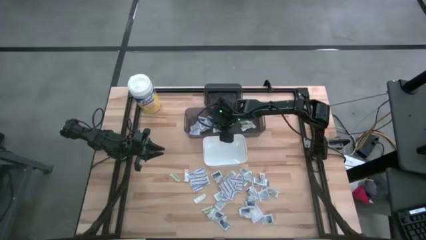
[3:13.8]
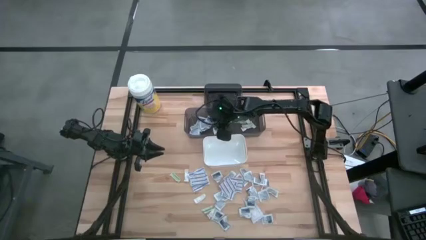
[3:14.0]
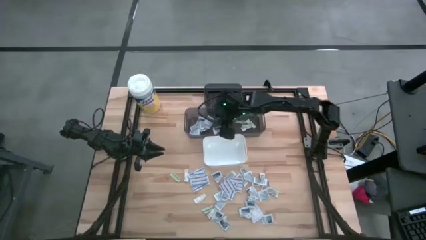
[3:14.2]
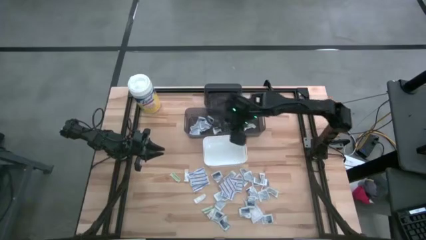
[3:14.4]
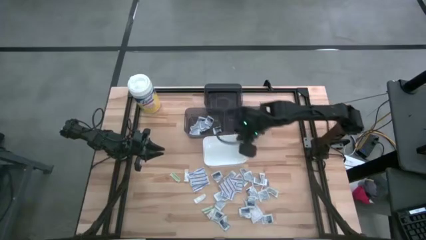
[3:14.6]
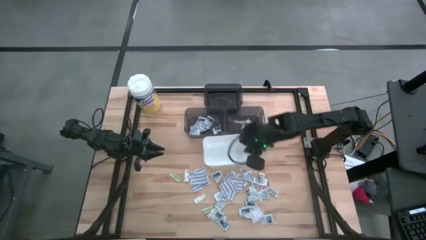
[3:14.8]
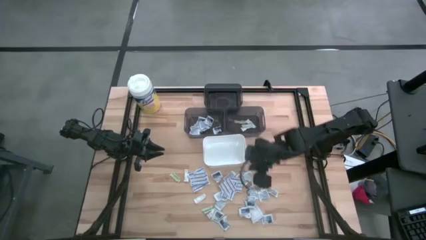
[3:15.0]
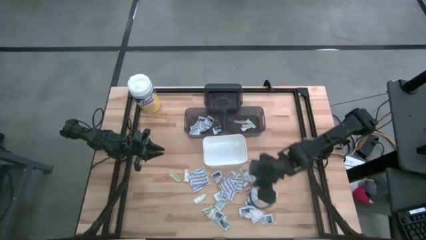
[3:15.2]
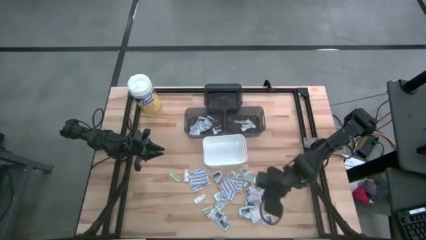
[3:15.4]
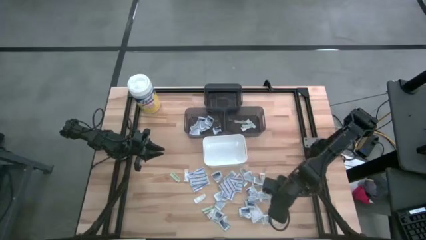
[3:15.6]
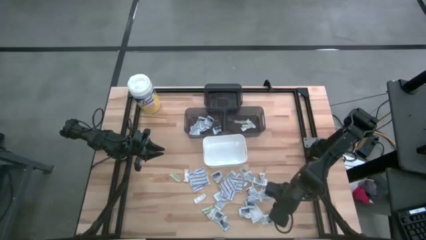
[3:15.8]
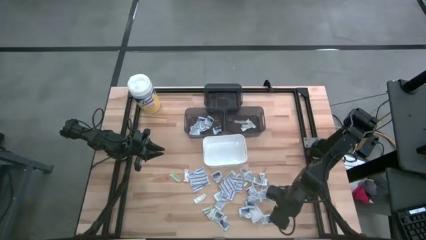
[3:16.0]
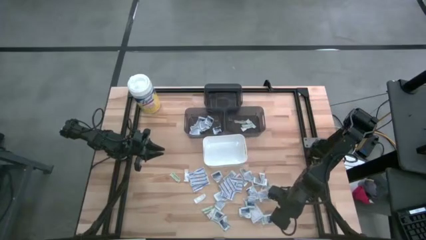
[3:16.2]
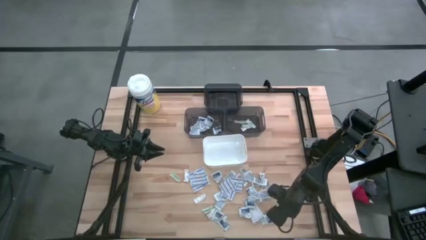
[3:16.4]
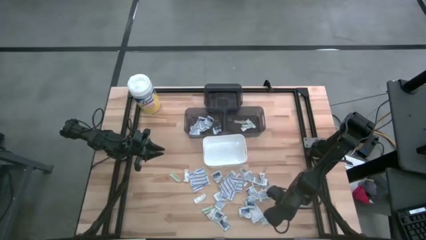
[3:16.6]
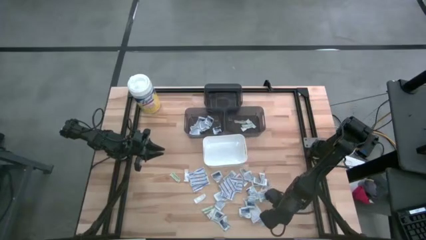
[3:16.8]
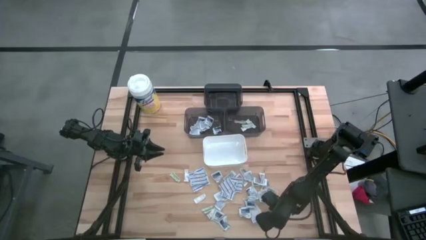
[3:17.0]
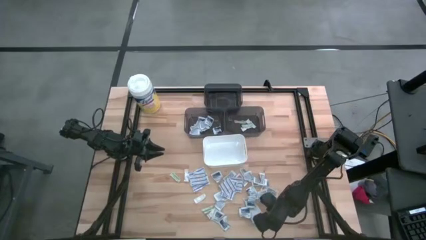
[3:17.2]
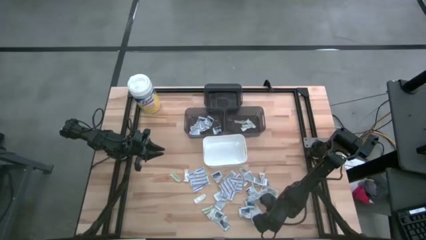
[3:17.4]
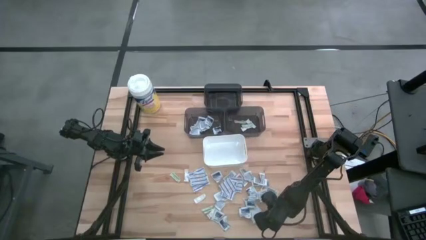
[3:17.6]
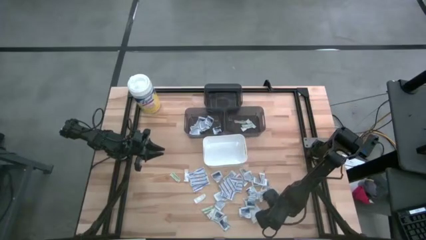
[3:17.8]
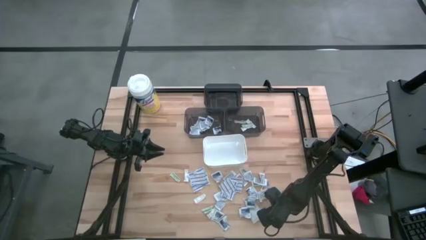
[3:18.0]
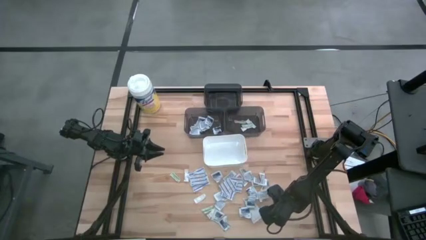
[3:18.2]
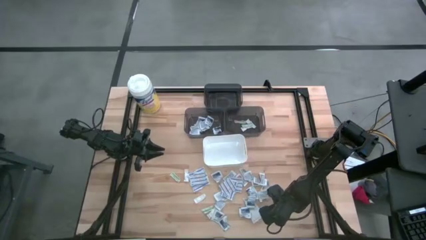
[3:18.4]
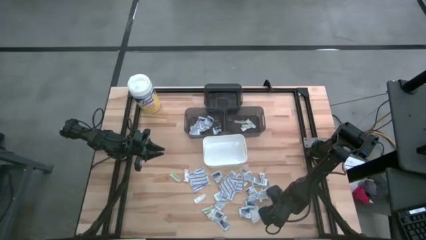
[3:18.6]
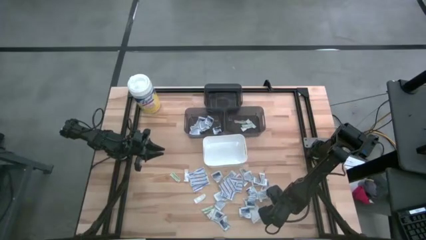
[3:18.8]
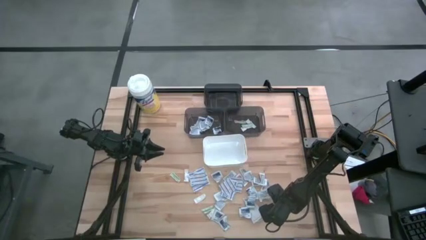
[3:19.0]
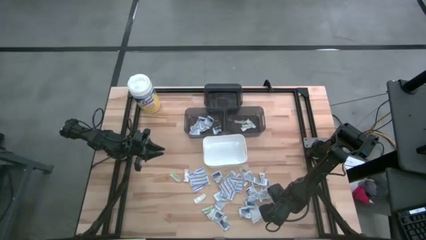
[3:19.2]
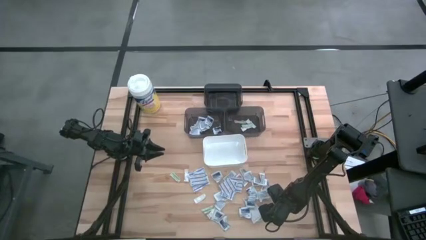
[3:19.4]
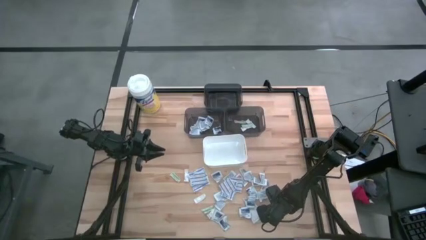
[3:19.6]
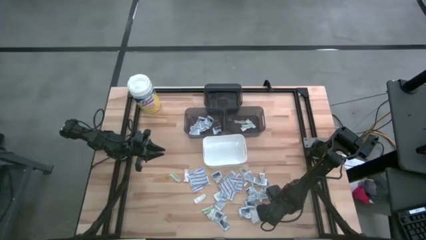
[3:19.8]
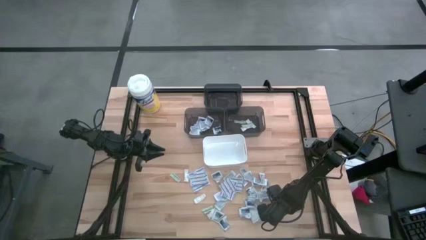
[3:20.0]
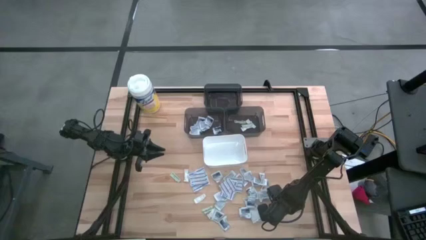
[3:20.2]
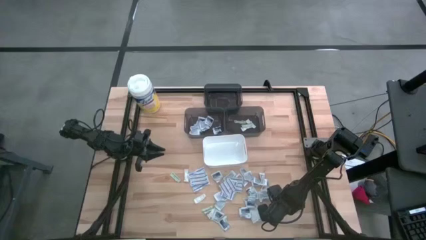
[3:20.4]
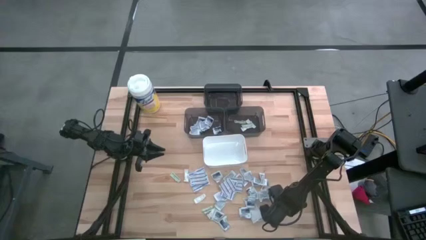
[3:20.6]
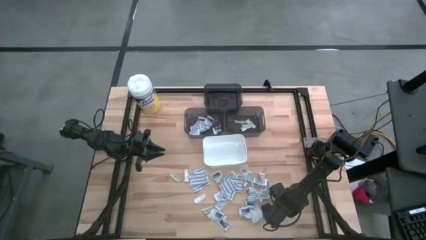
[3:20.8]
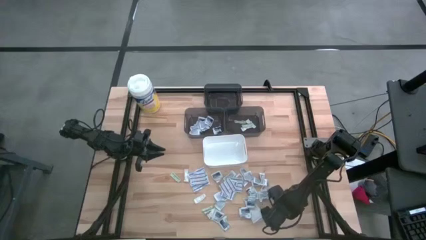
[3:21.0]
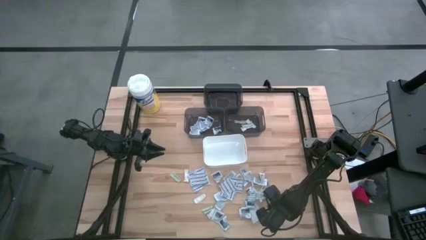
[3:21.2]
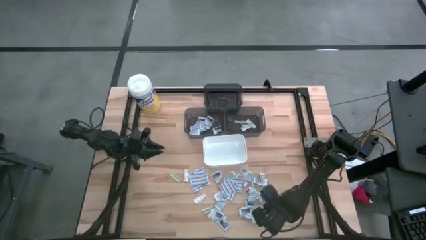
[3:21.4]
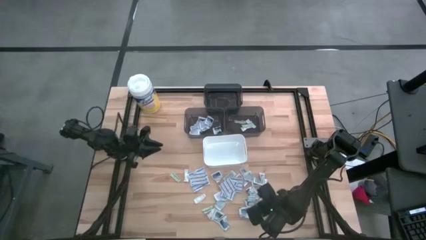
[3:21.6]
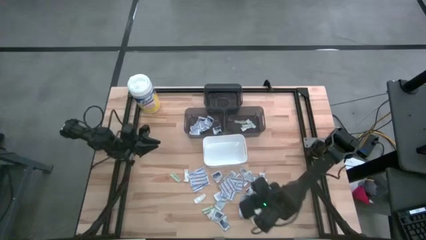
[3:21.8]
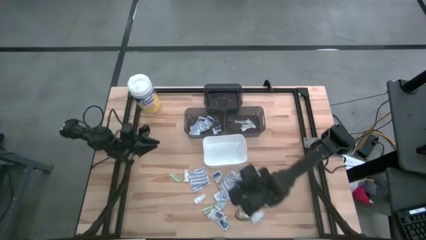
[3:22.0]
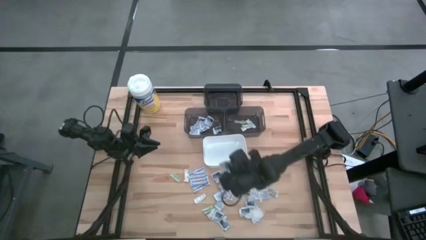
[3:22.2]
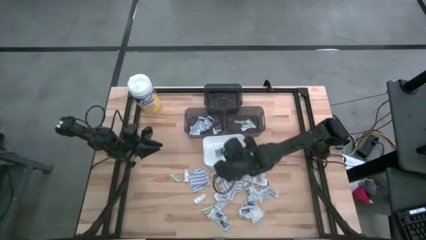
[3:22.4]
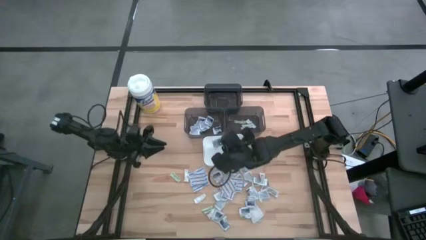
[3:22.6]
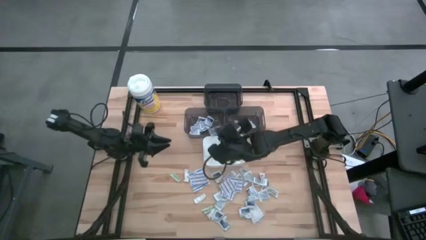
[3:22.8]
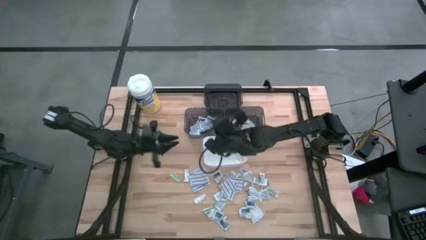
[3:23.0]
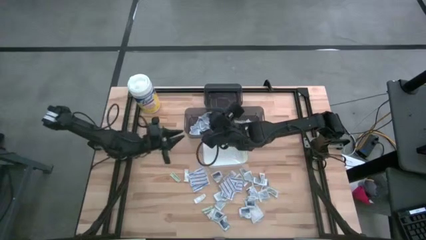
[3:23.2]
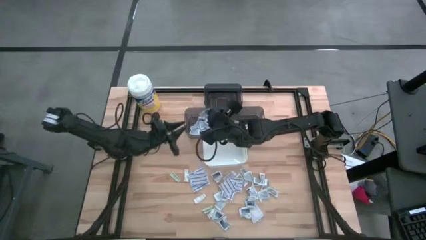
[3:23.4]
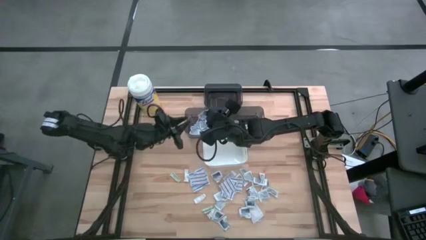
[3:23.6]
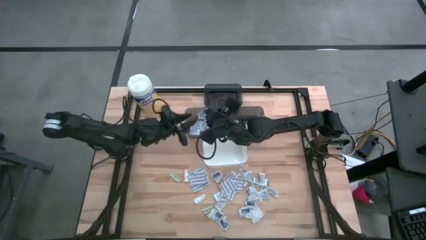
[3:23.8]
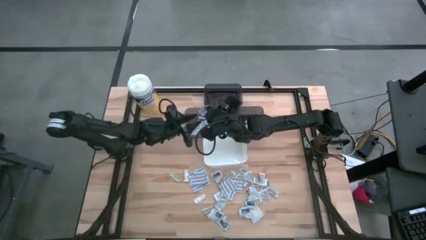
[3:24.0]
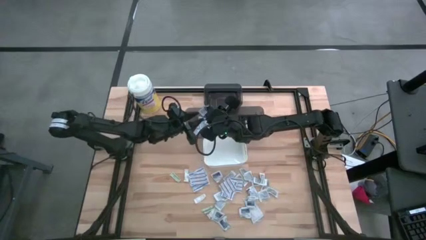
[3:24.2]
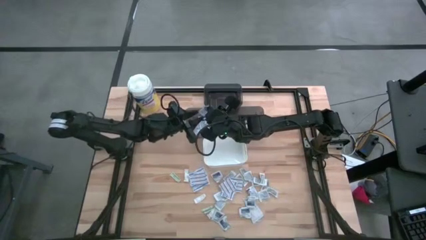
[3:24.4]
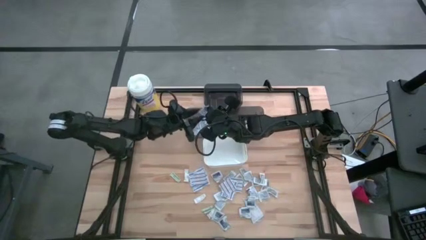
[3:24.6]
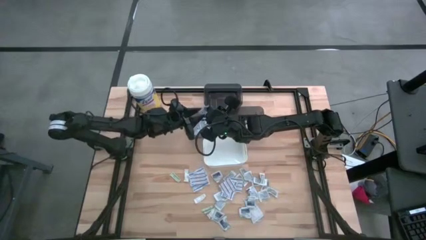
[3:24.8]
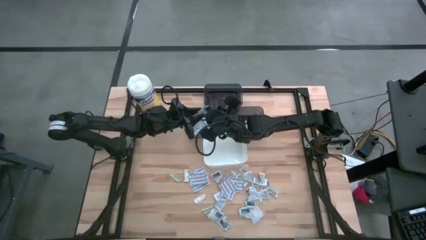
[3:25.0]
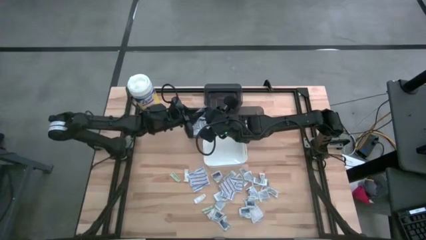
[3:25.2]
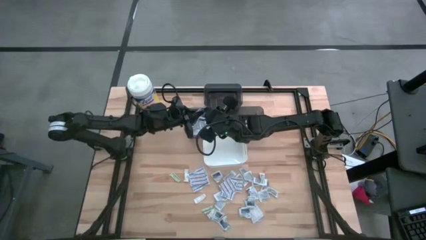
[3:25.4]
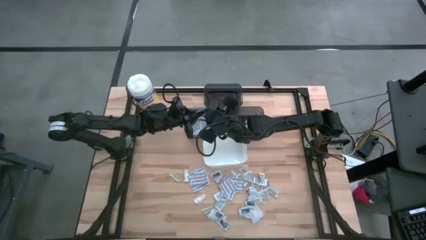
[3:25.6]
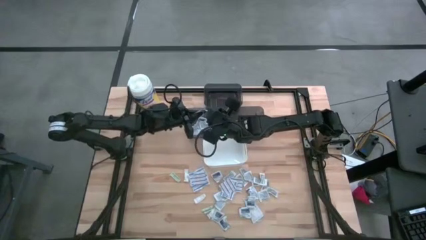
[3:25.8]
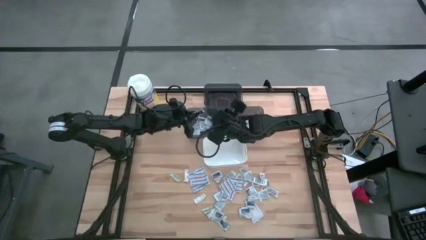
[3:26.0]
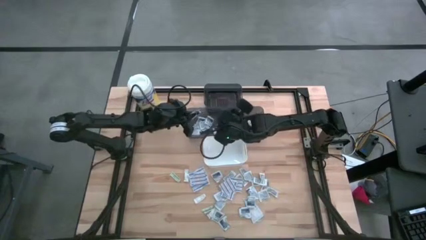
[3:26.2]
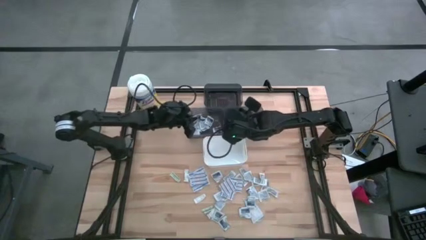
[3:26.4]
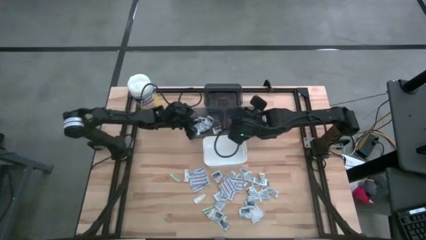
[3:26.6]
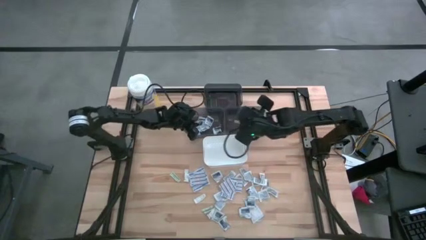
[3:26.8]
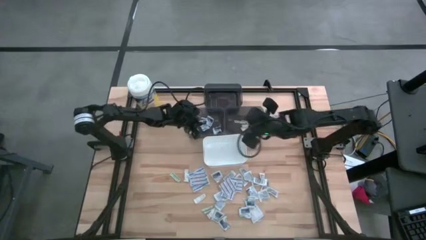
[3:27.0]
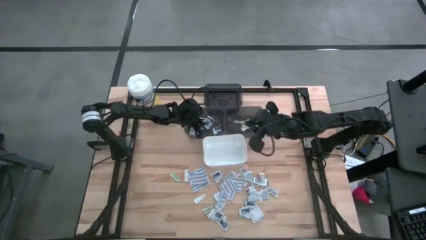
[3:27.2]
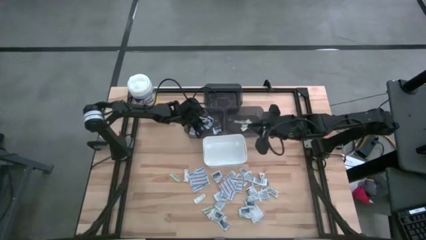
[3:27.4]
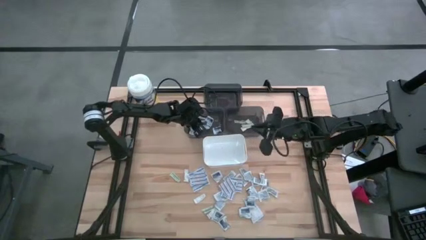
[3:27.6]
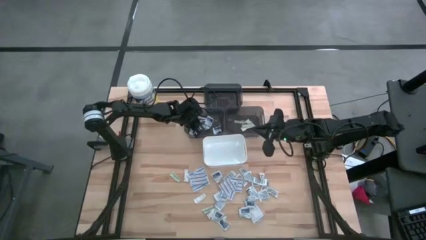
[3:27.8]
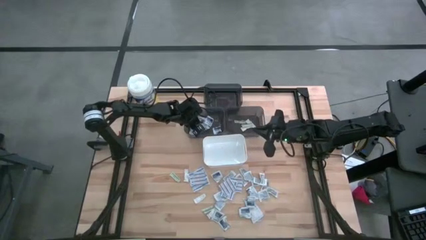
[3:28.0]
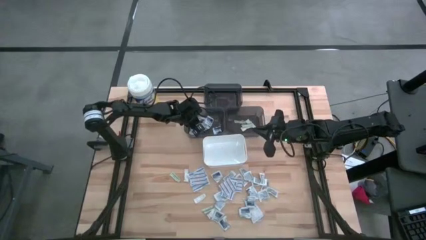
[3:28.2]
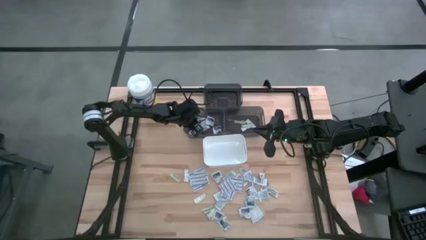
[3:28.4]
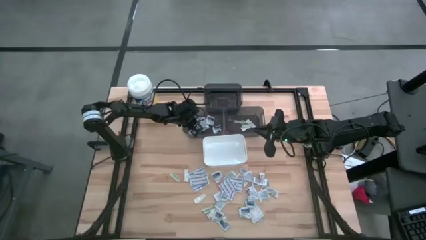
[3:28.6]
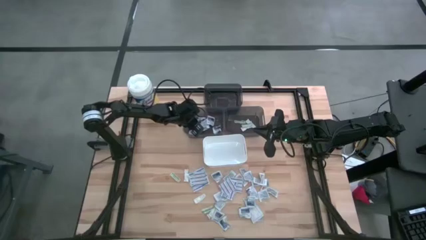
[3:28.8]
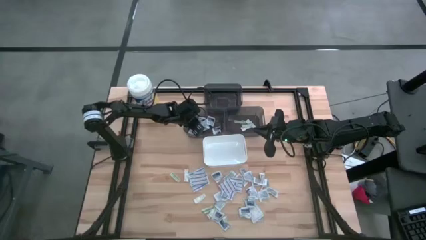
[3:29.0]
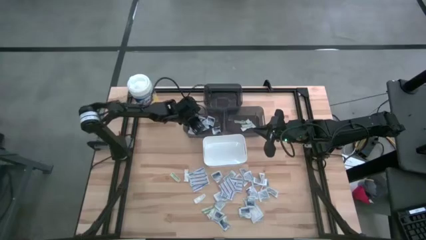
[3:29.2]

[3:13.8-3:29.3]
Task: Pick & Place First Aid Supplies
Put the alcohol pad into the bottom left black bin
